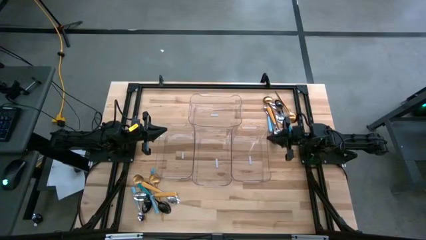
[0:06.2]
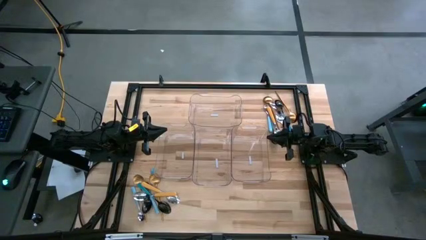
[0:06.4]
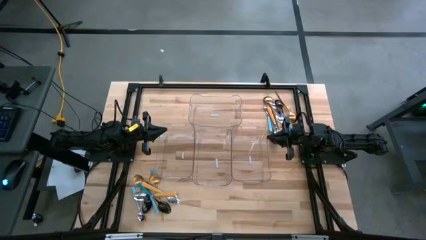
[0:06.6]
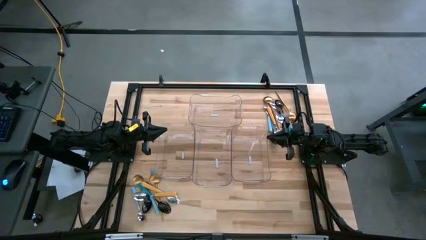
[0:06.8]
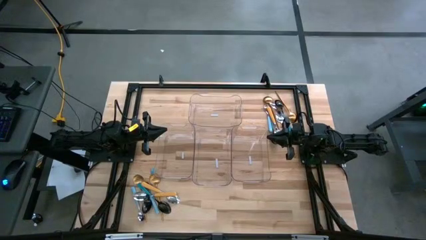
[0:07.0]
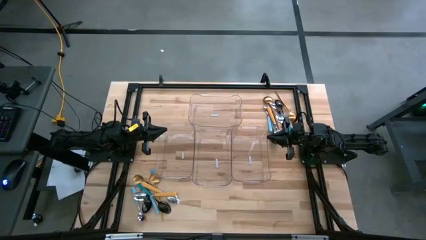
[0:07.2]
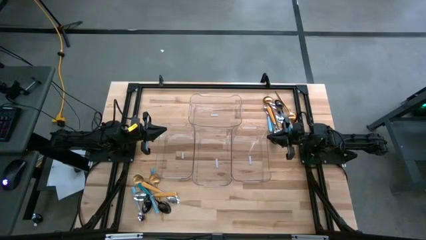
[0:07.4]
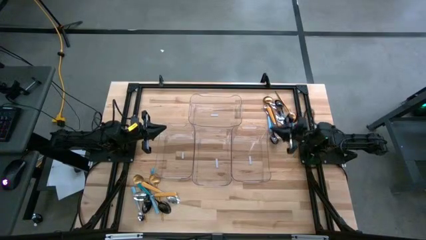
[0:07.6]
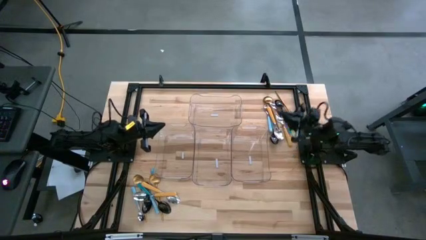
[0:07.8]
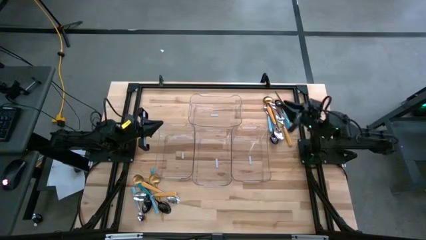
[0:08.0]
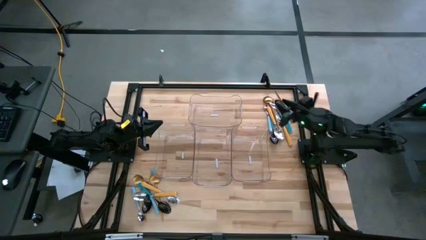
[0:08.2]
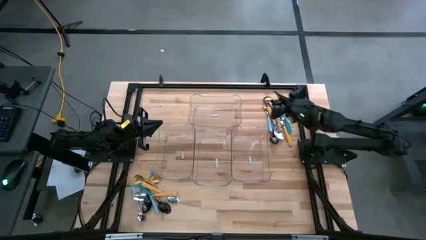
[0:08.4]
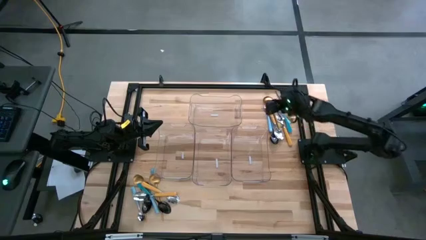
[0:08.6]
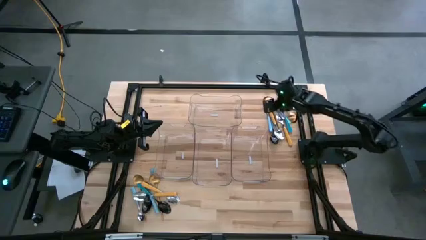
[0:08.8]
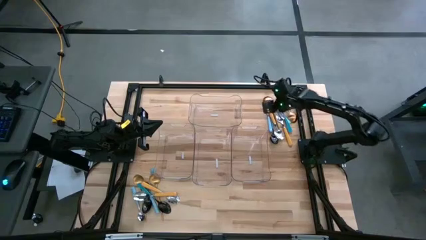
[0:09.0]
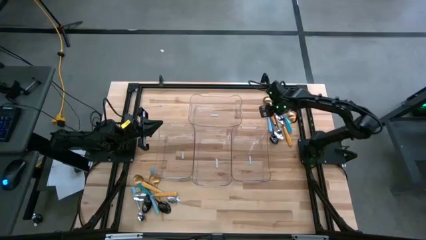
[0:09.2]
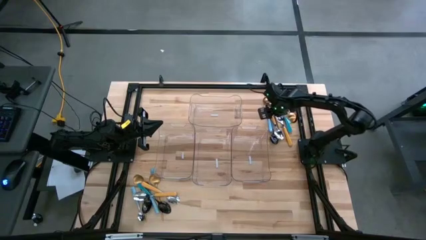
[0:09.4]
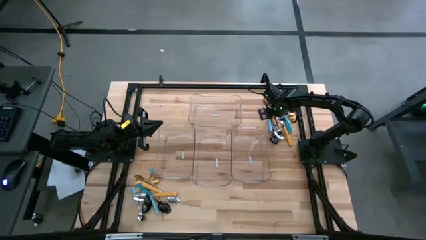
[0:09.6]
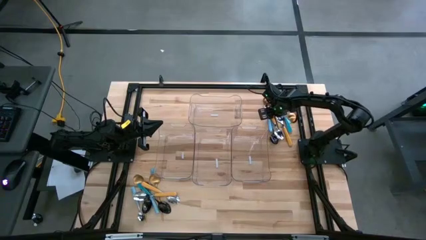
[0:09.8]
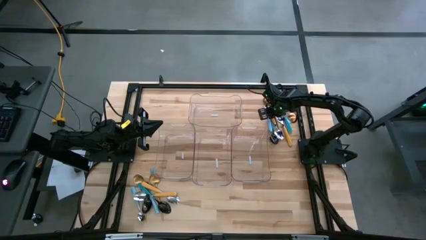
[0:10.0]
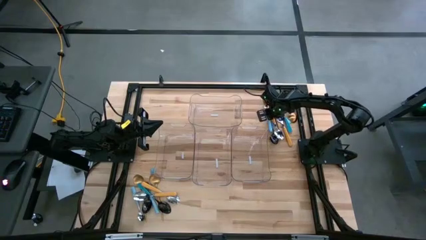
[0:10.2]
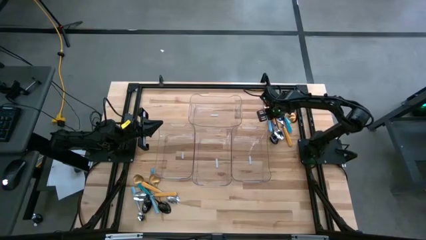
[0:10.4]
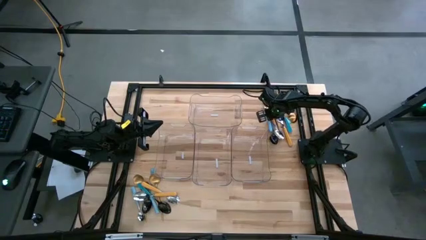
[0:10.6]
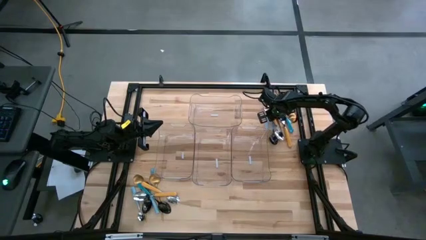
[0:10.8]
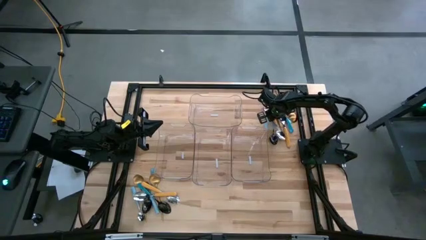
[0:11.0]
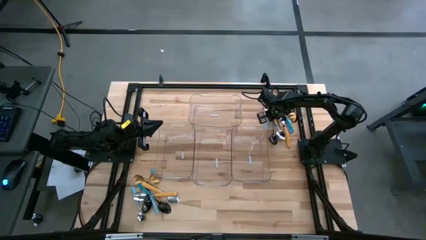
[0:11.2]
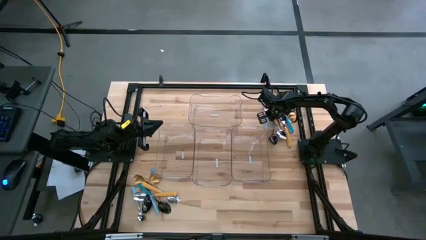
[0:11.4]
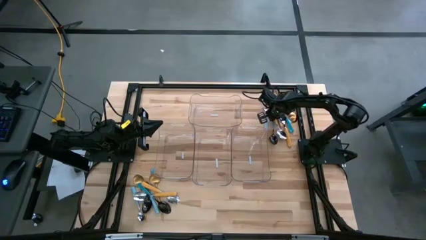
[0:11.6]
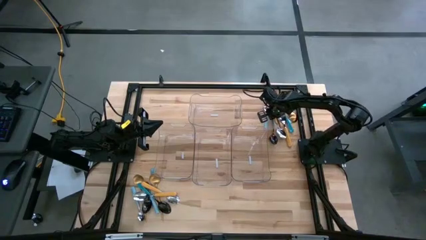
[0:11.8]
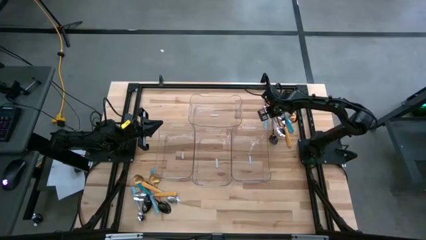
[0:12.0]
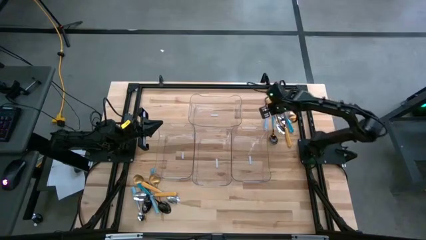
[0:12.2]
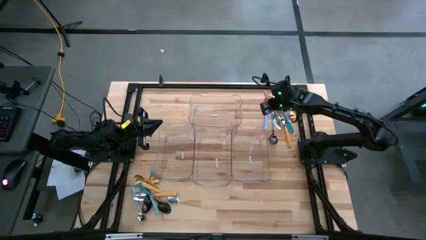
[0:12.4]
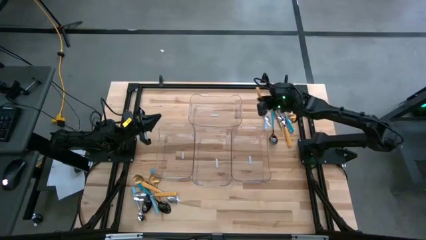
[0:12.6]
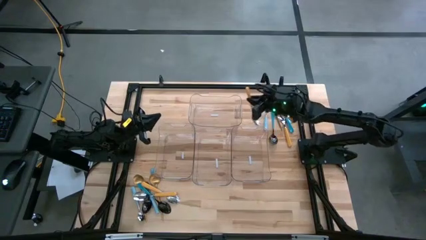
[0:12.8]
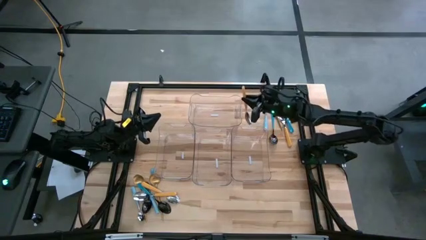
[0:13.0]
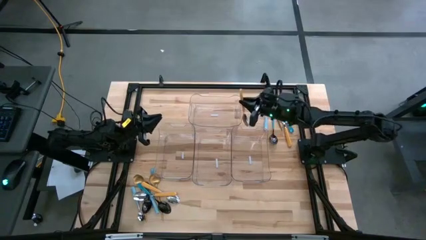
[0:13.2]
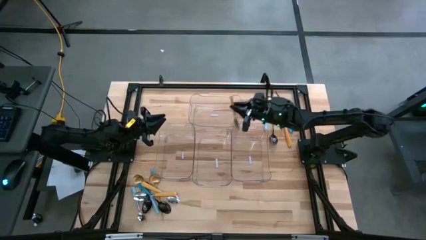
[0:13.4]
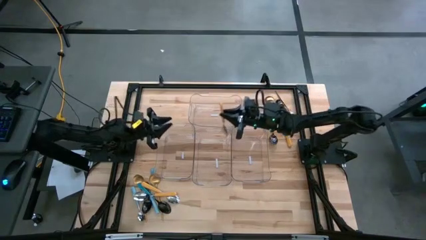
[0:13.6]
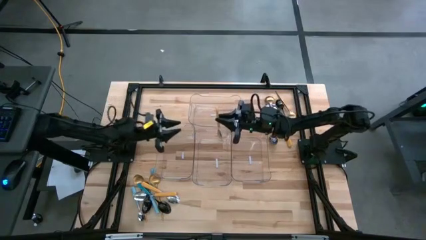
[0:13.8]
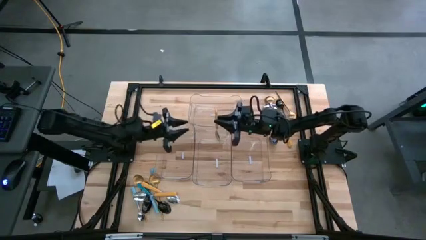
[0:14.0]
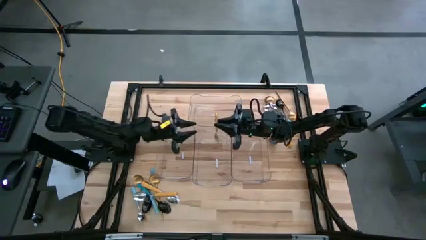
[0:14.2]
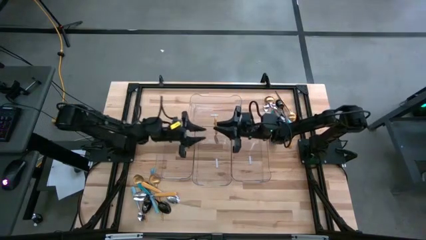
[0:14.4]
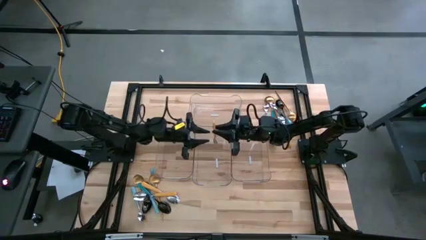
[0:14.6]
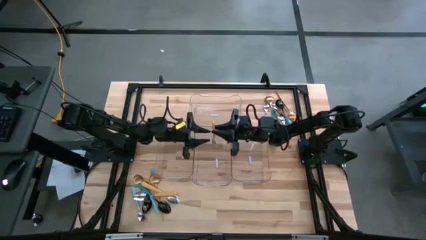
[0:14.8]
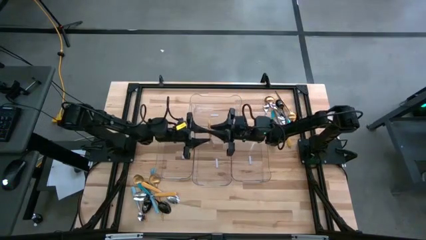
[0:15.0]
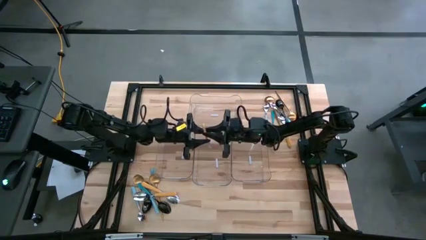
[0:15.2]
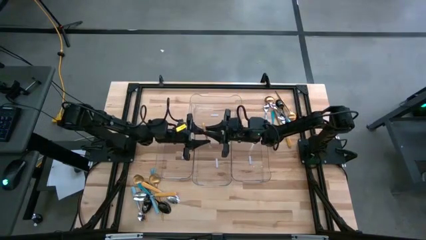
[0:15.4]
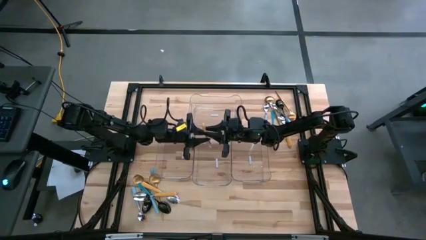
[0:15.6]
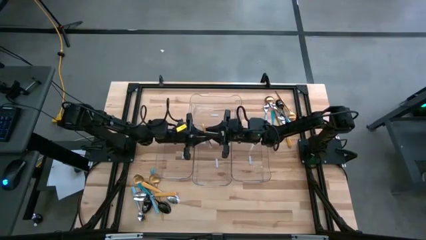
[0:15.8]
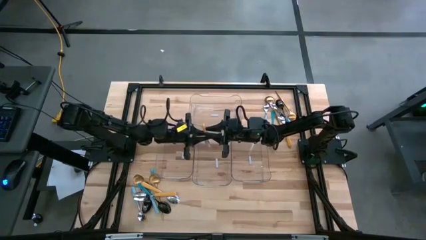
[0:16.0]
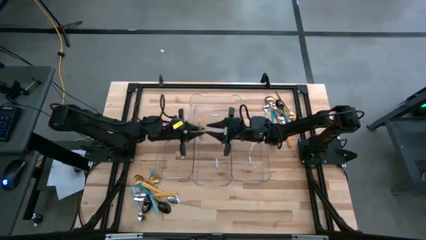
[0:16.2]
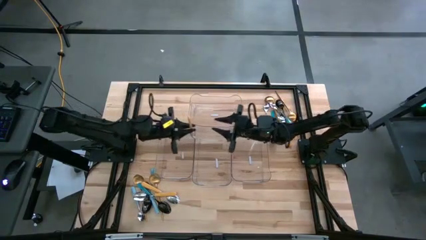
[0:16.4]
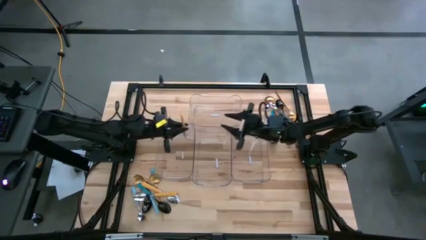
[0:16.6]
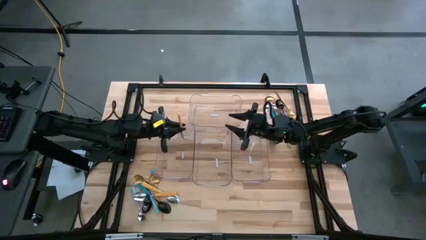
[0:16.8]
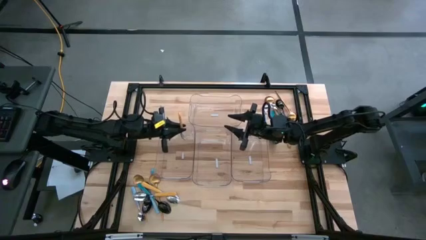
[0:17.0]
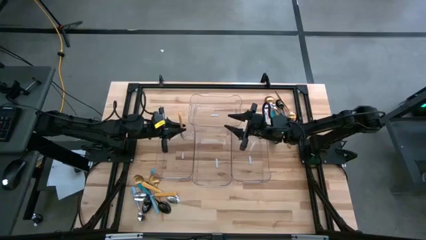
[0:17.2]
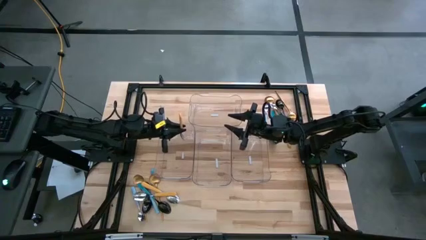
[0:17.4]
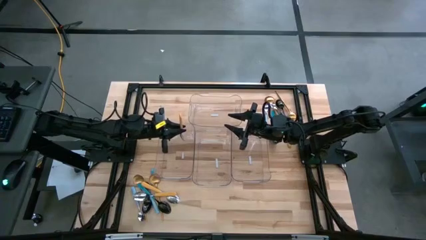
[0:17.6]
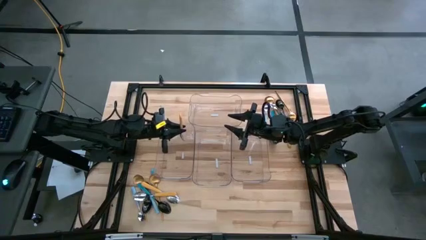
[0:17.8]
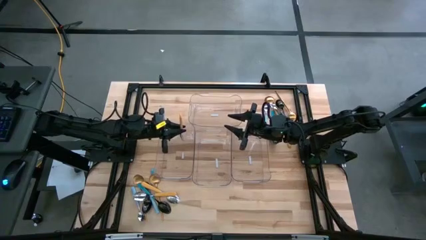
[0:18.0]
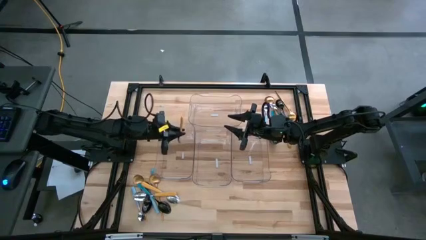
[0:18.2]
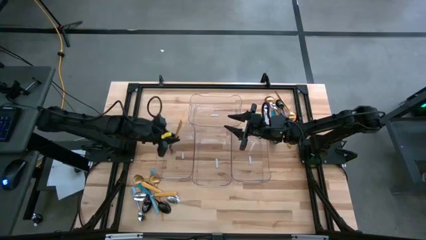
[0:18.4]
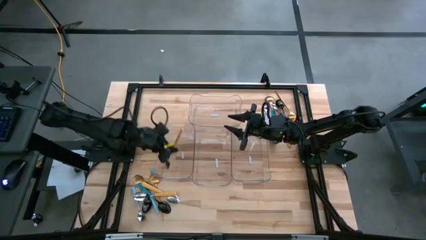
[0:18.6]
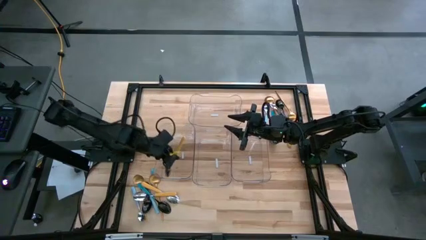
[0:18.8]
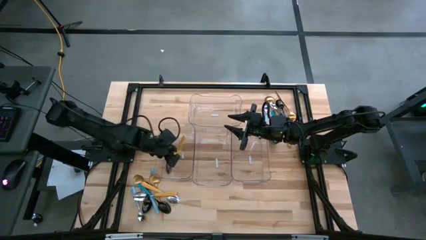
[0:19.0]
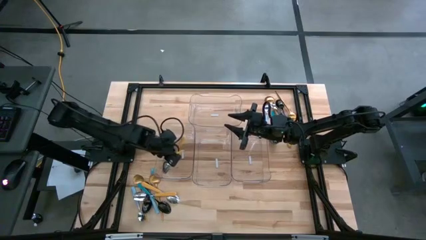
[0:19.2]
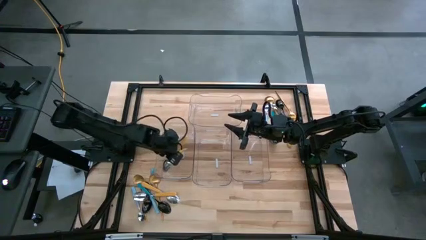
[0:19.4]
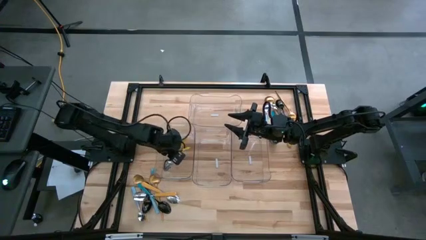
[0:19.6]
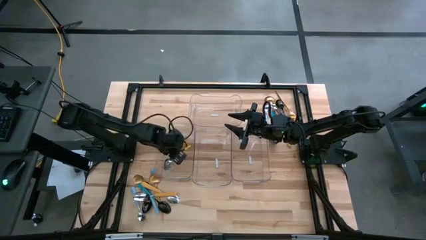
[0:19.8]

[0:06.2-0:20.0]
Task: Sort silverware by color (type)
Put the yellow spoon into the left transparent bin

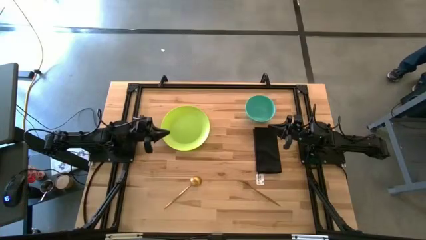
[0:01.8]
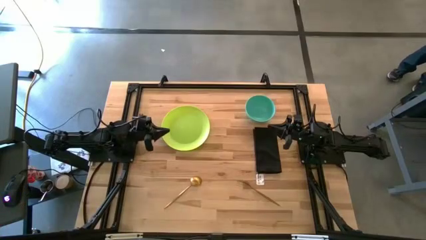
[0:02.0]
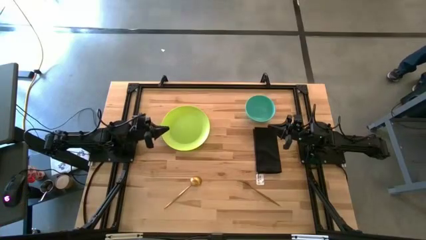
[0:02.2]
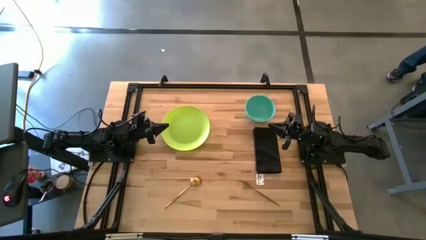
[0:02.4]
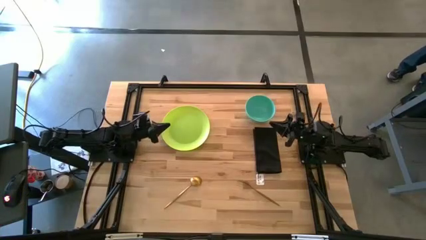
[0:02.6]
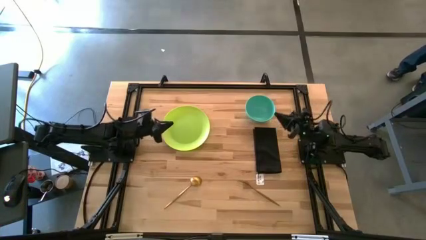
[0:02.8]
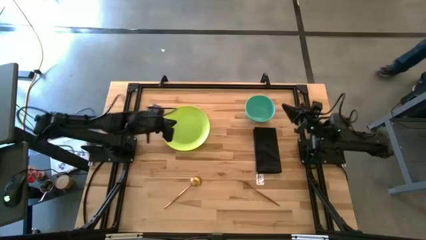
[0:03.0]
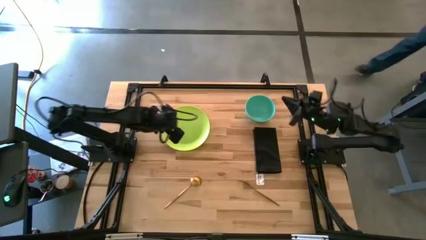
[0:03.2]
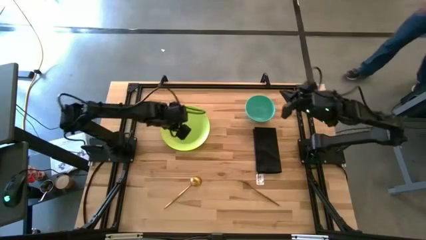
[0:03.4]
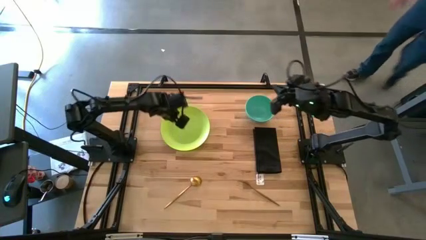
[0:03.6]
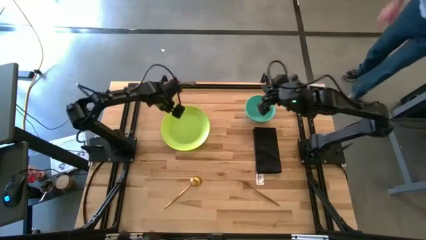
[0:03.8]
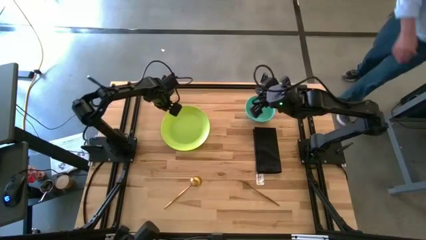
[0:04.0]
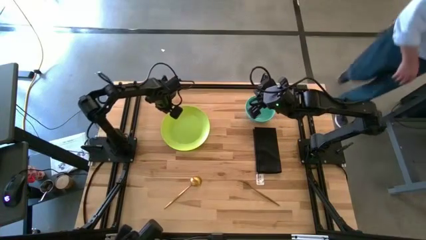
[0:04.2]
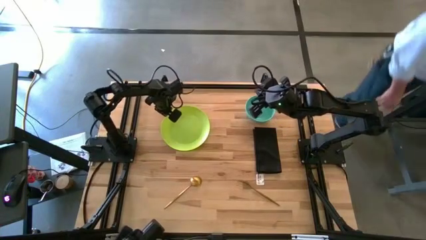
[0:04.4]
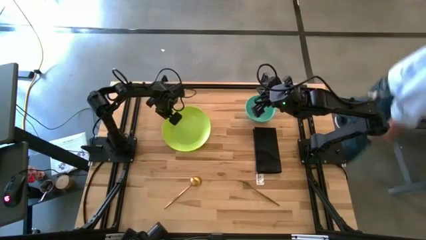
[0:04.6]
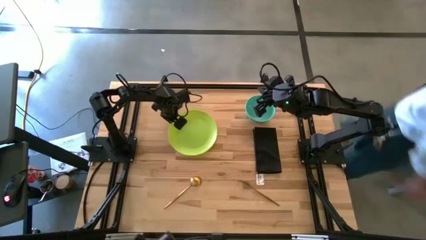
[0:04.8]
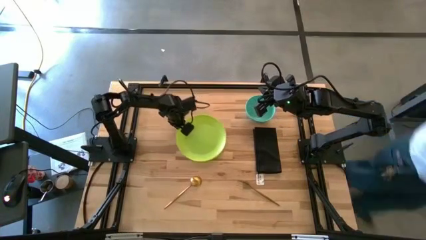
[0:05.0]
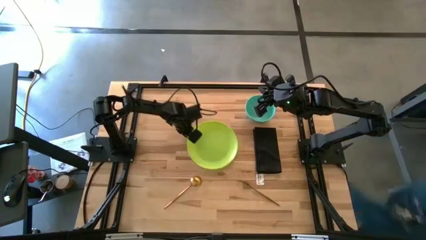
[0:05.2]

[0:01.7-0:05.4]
Task: Set table place
Move the light green plate to the center of the table
